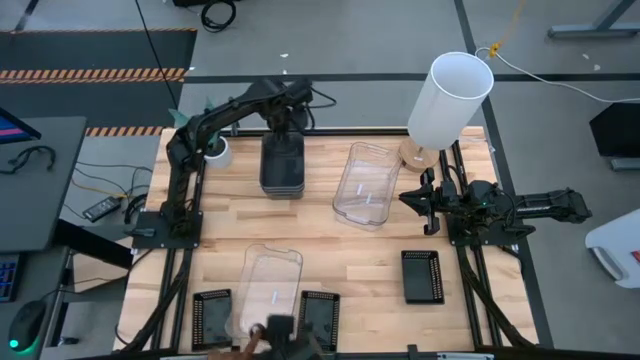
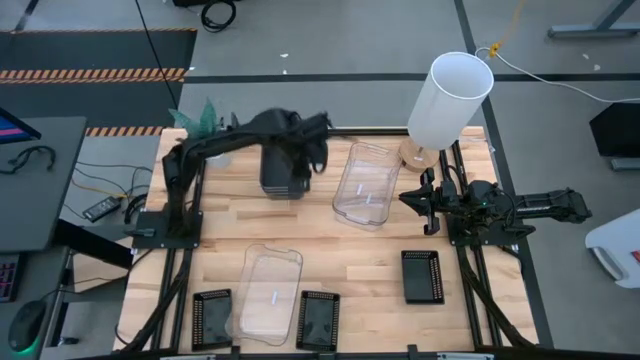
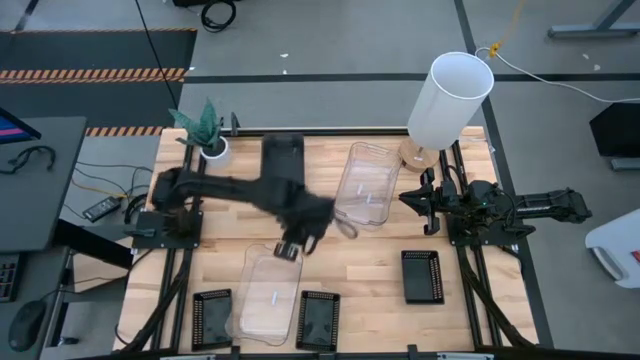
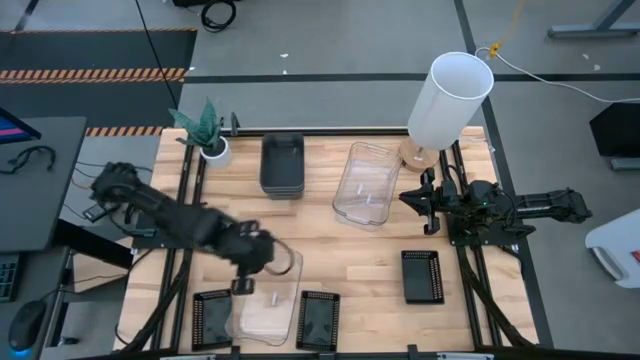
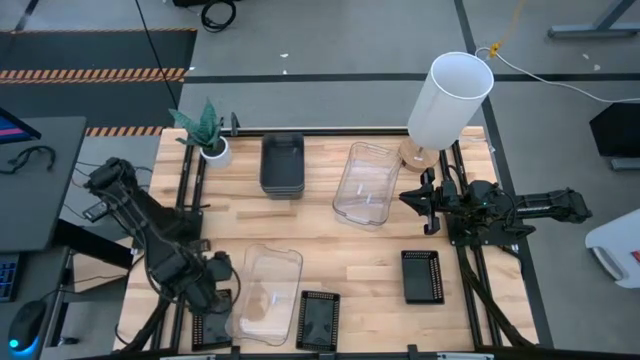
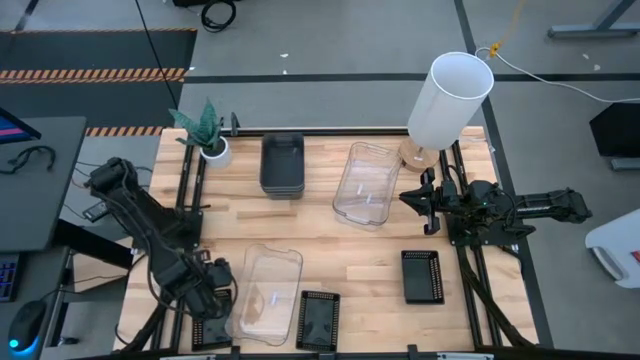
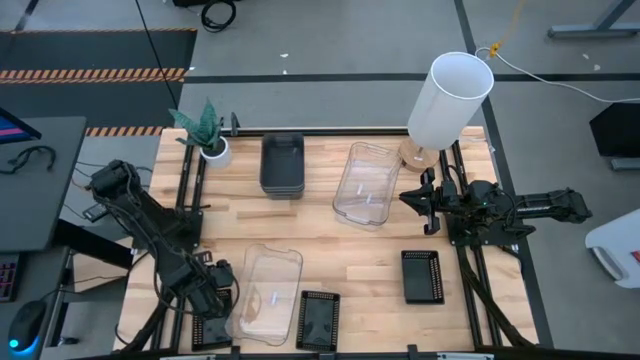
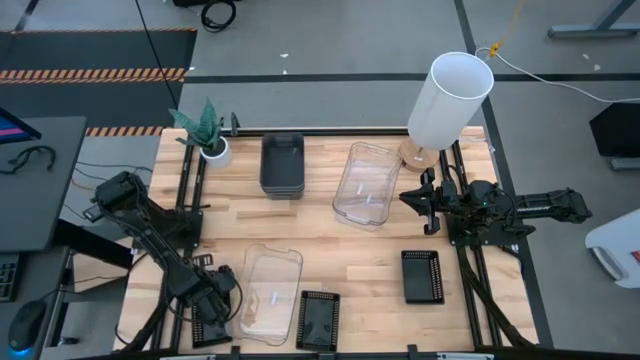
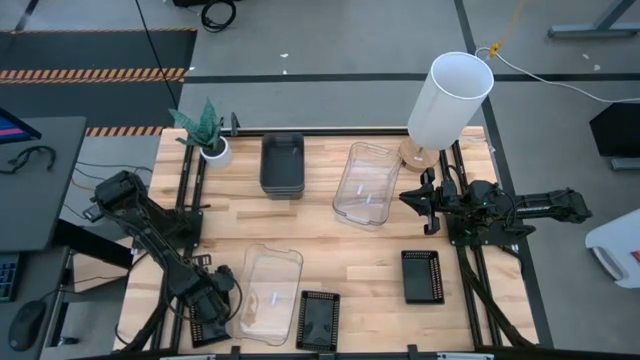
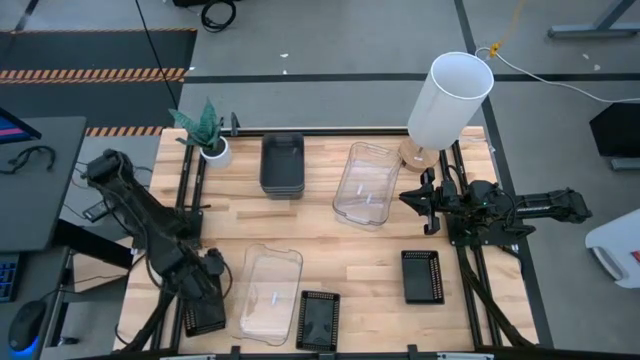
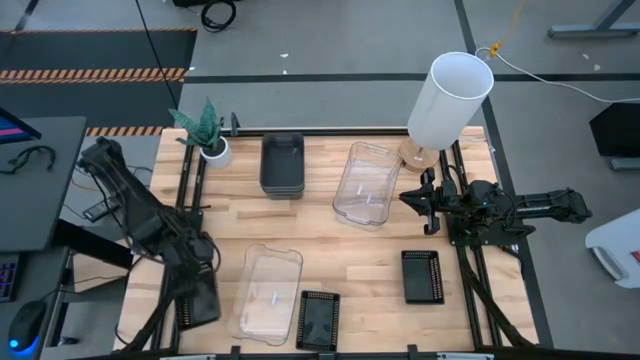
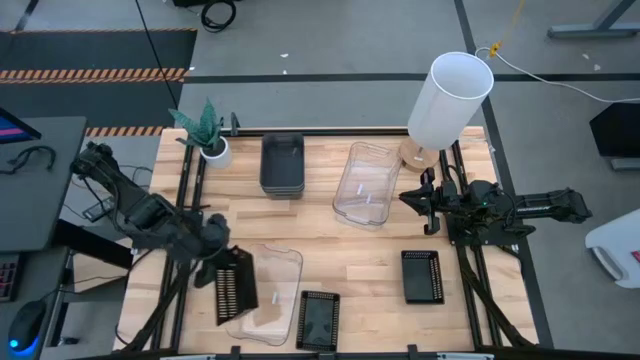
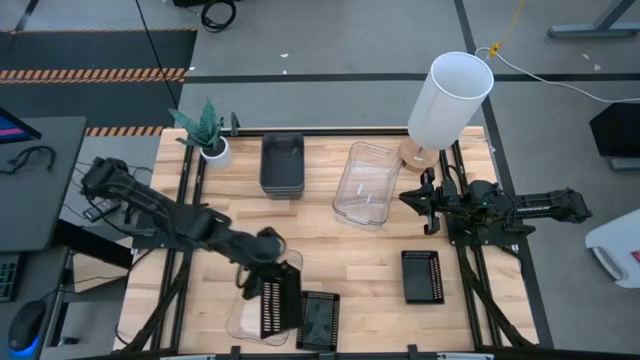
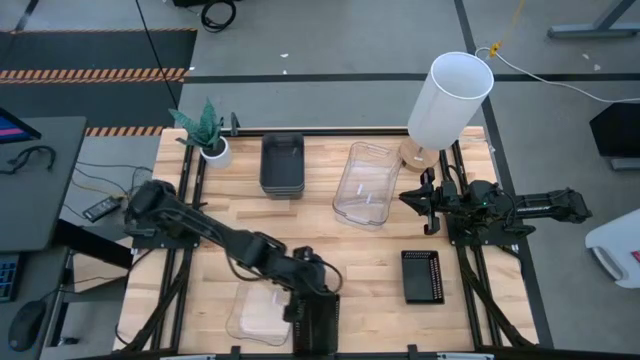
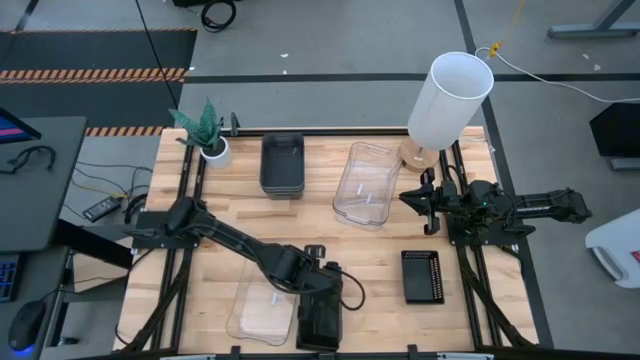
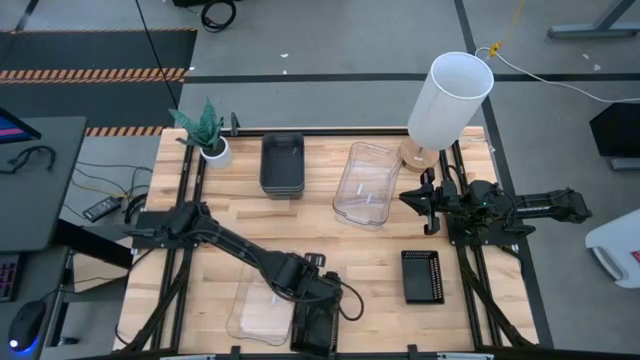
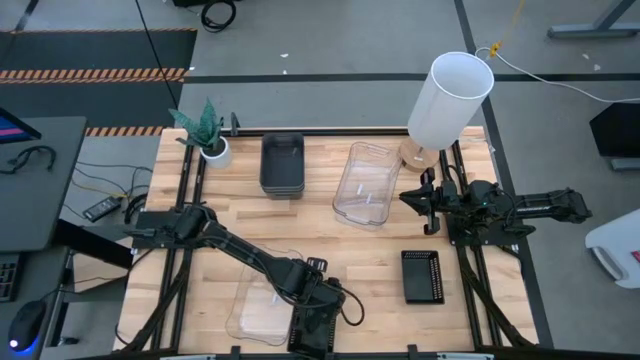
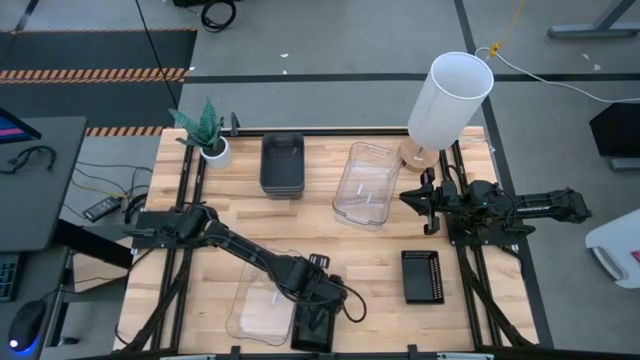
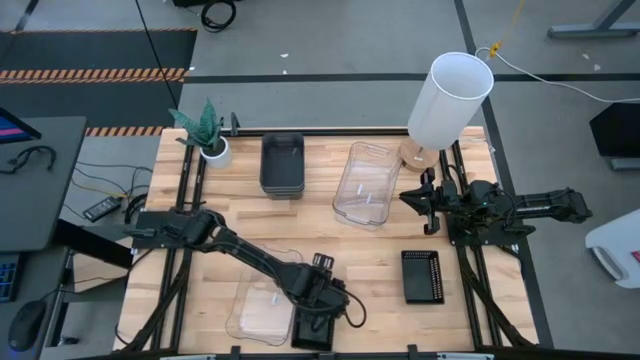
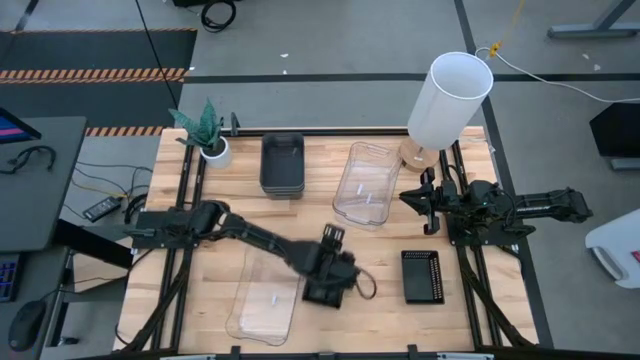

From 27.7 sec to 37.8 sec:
Stack the bottom left black bin on the center black bin

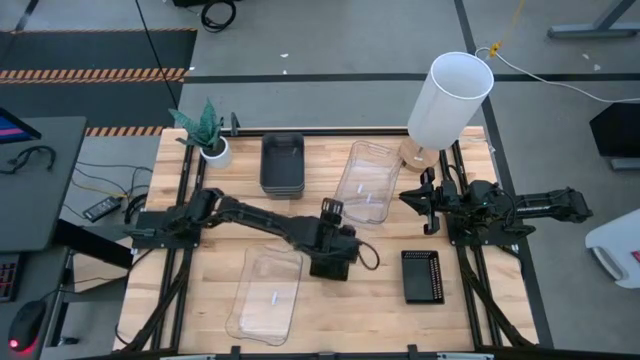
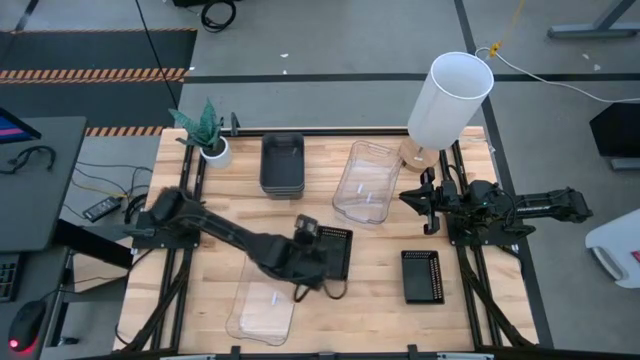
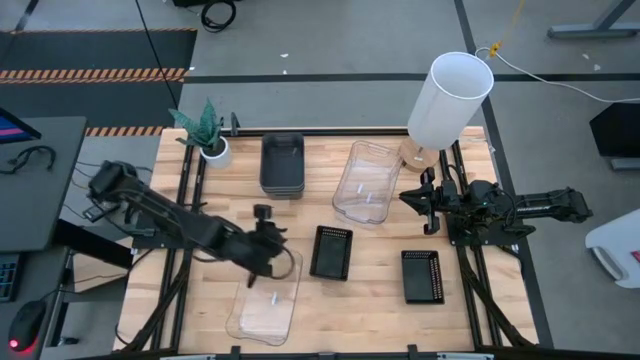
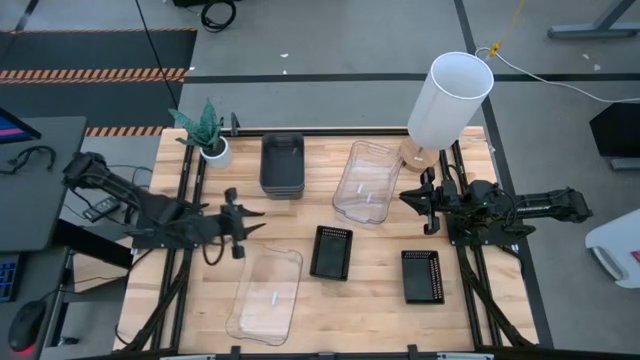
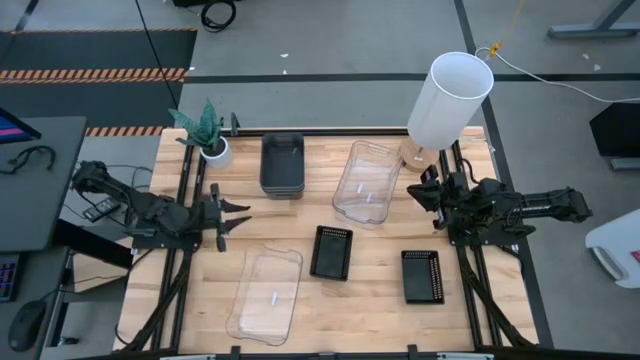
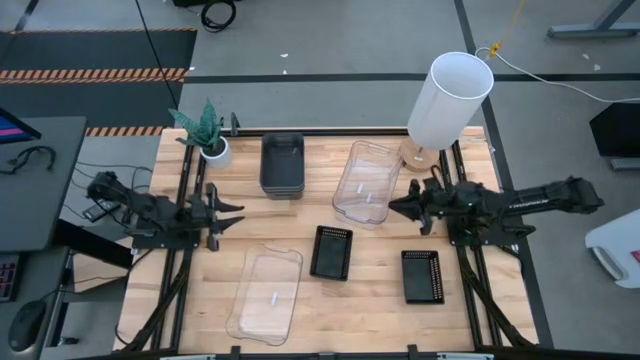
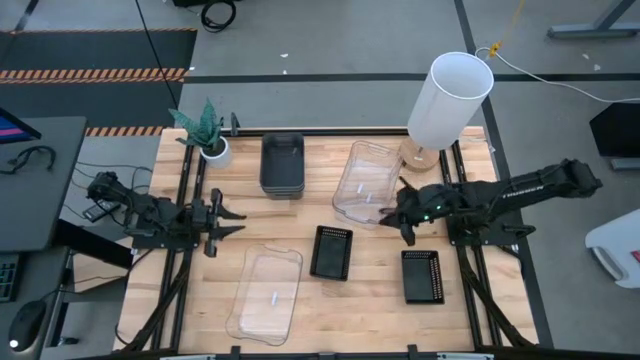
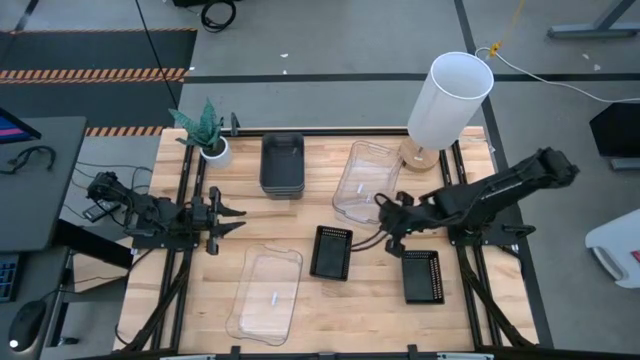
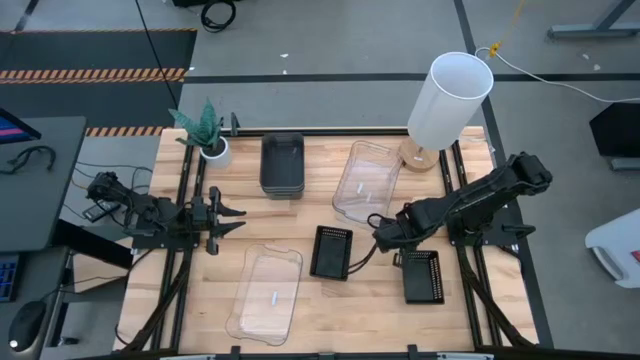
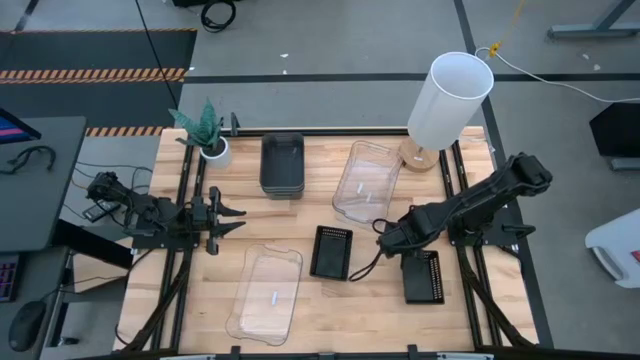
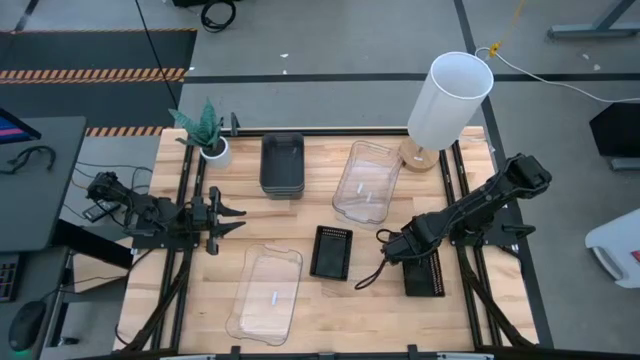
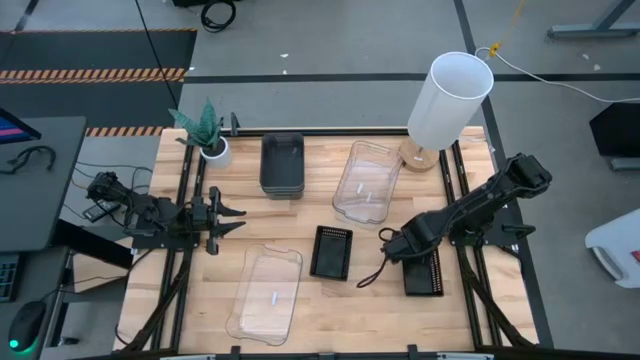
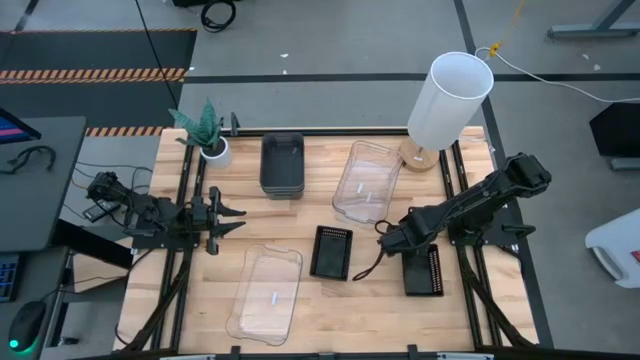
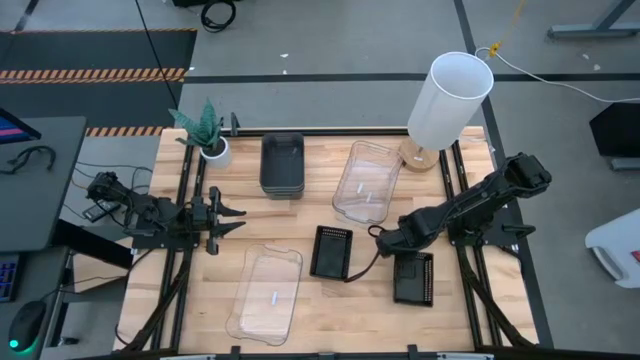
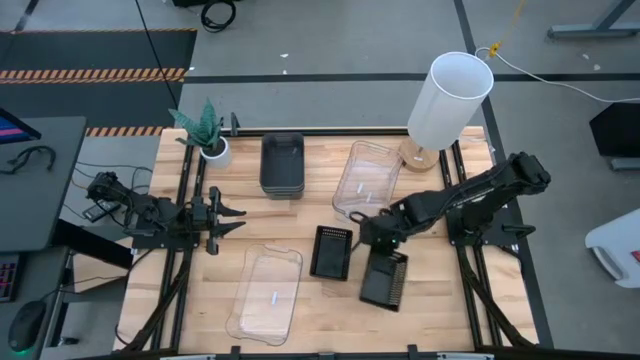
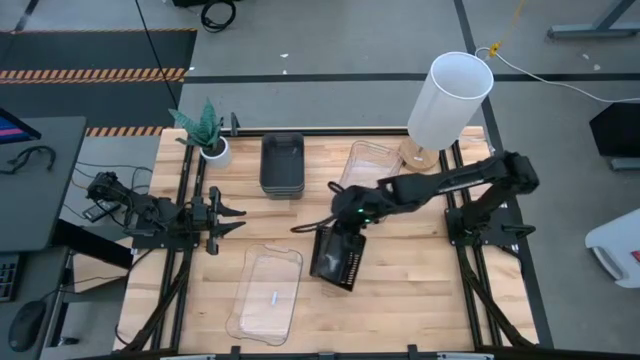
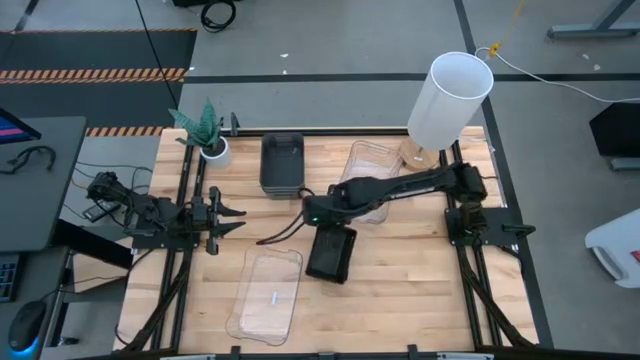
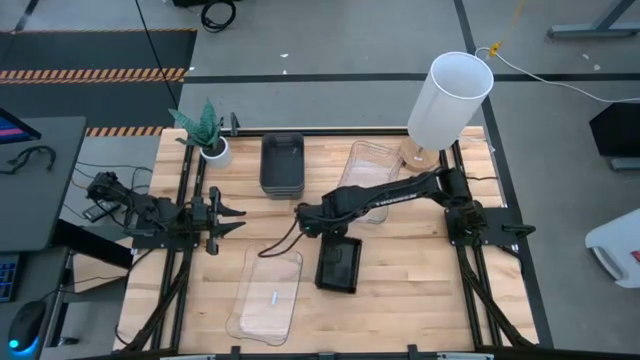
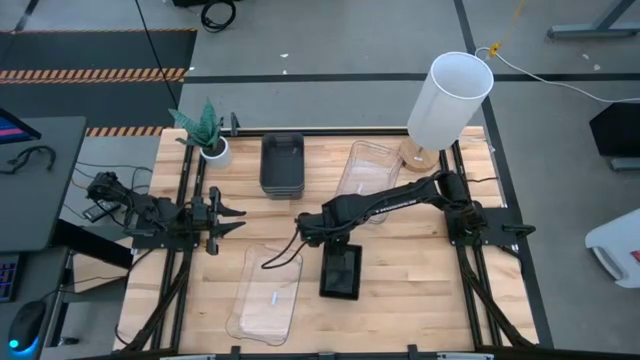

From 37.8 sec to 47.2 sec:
Stack the right black bin on the black bins
